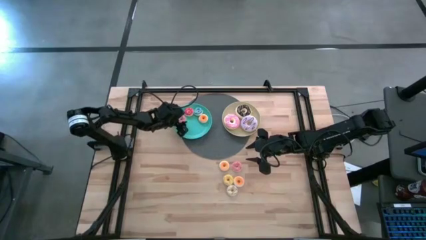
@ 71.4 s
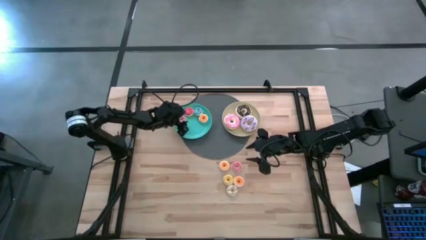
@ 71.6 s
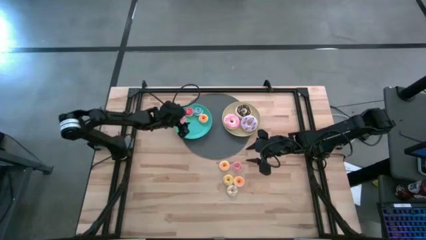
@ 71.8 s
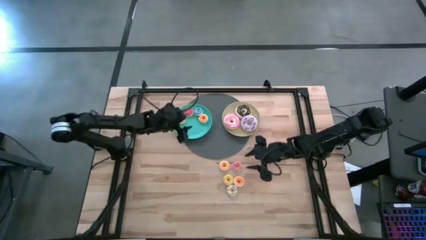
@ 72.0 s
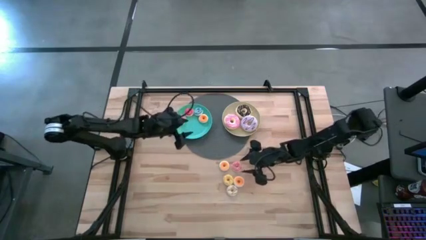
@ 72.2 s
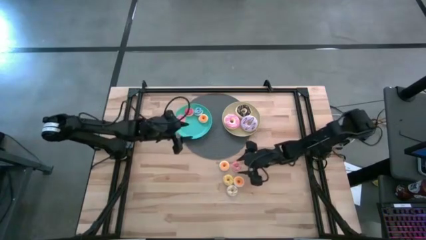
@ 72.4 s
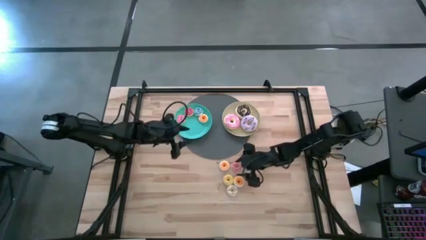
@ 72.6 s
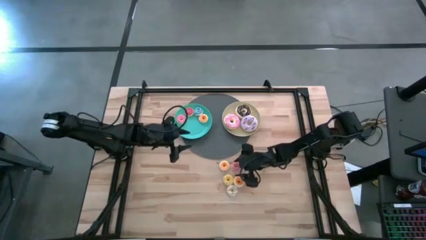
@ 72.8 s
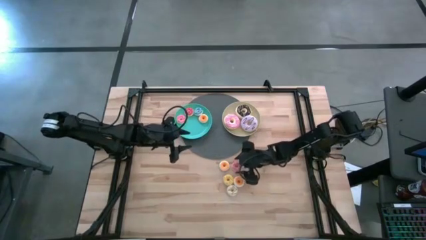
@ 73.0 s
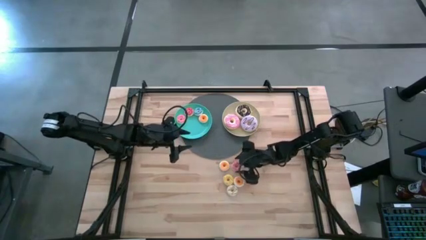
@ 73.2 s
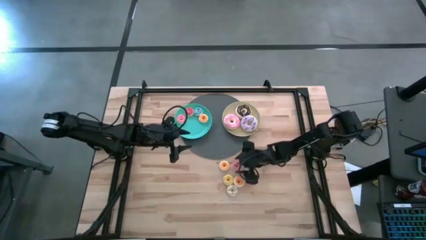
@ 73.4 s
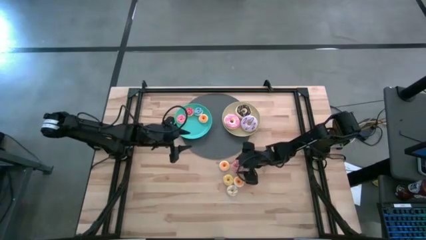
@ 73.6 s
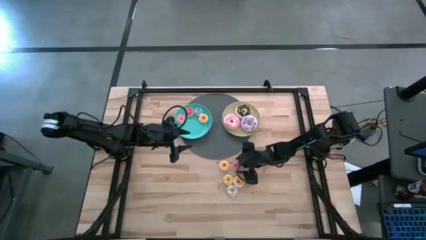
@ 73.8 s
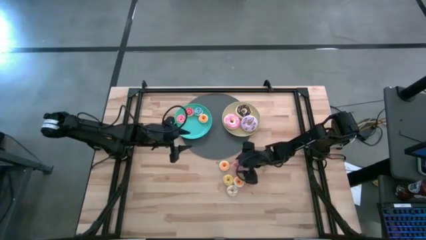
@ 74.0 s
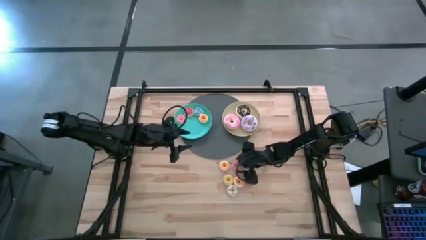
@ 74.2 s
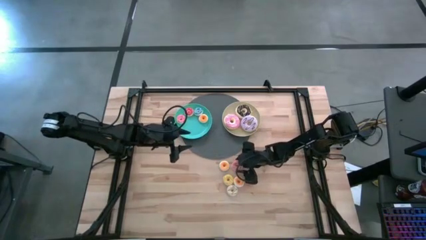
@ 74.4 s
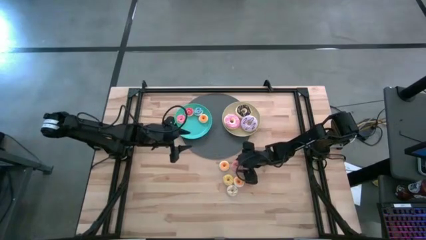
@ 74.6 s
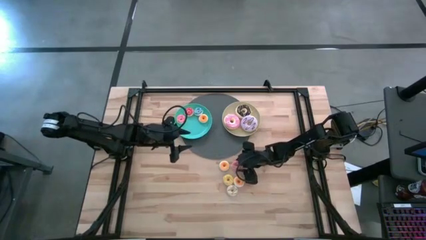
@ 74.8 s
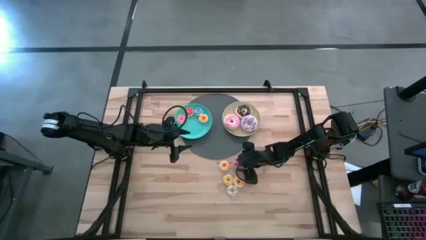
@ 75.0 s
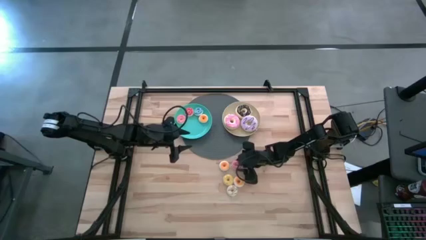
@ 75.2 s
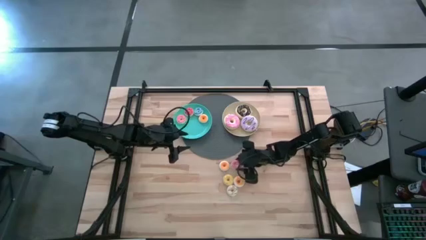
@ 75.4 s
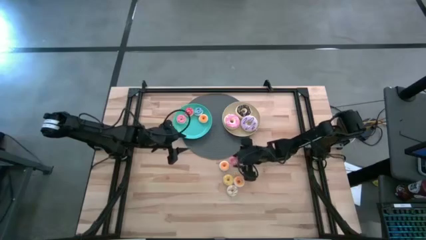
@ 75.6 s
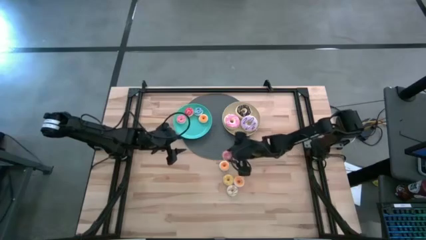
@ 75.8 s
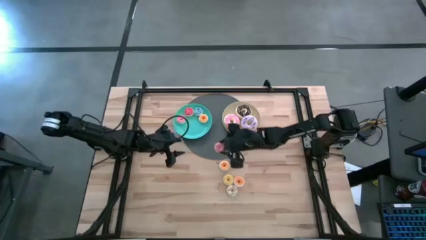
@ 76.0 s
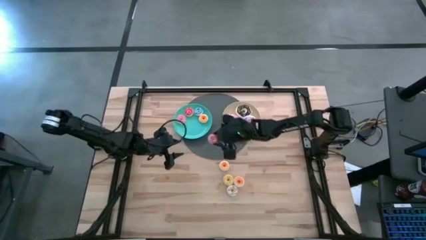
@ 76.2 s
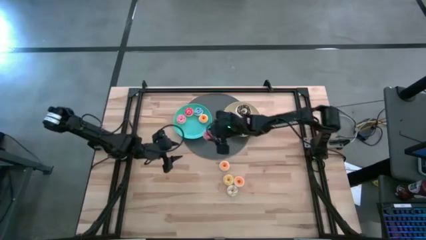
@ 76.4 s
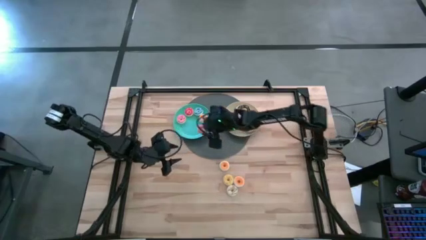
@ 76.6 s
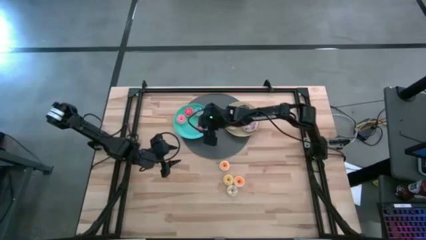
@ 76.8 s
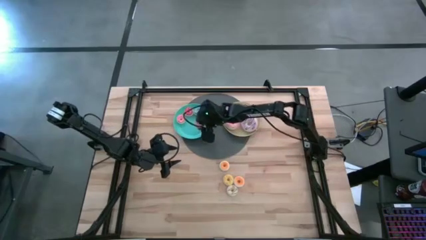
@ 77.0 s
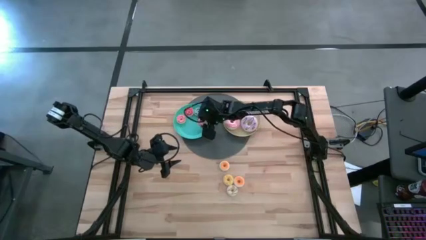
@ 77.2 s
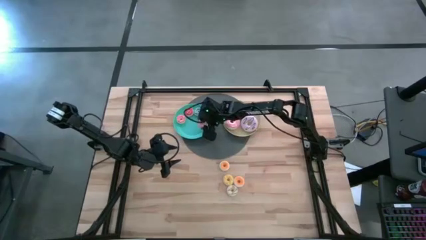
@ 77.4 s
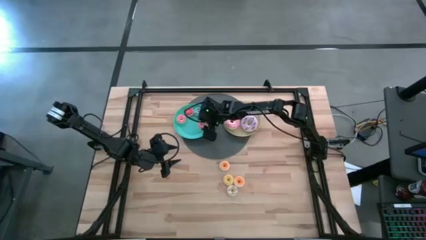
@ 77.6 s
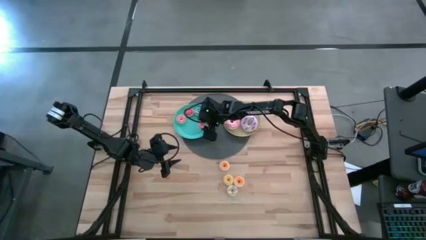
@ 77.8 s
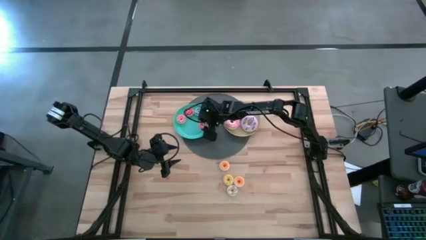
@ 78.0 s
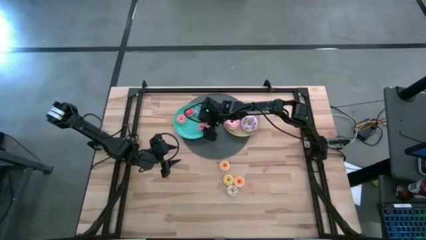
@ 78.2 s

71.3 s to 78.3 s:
Task: Pick & Place donuts
Put the small pink donut on the green plate

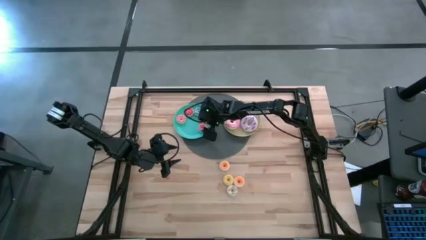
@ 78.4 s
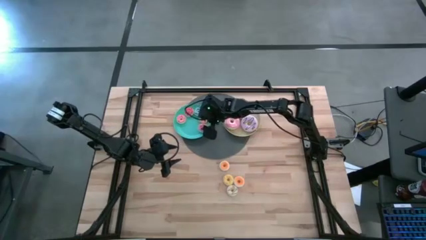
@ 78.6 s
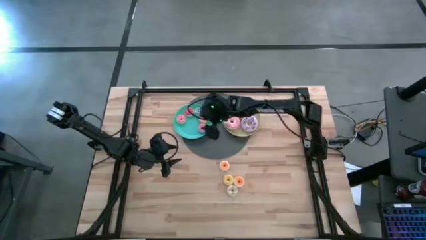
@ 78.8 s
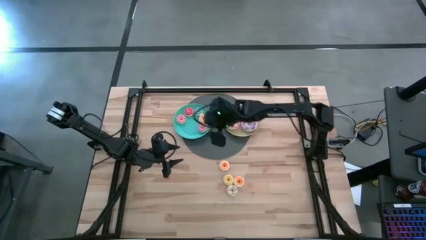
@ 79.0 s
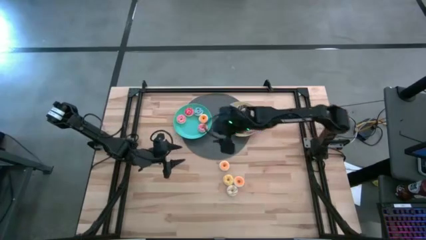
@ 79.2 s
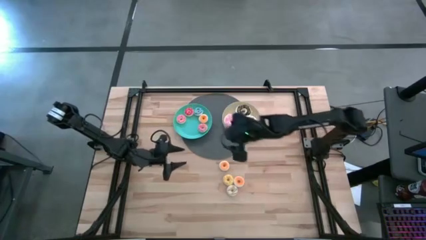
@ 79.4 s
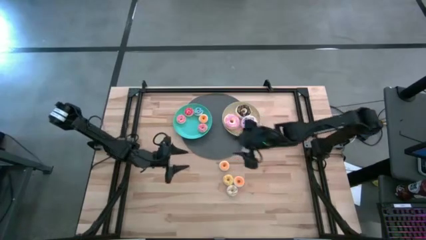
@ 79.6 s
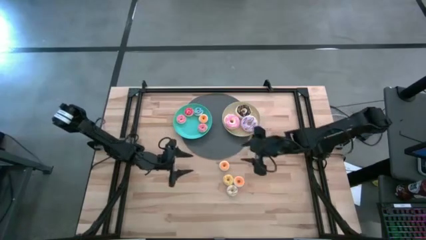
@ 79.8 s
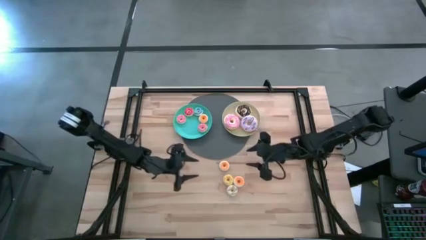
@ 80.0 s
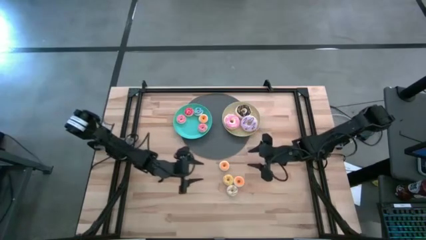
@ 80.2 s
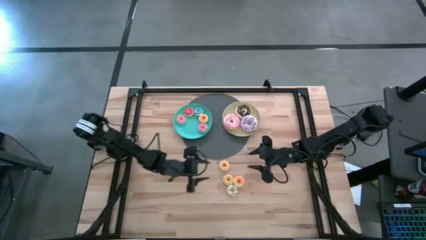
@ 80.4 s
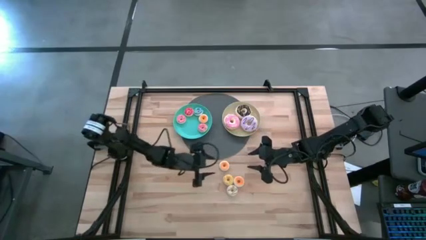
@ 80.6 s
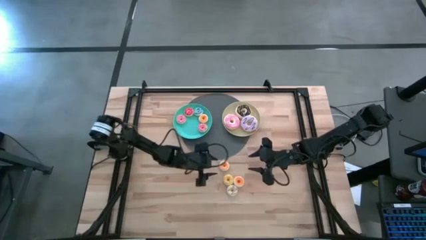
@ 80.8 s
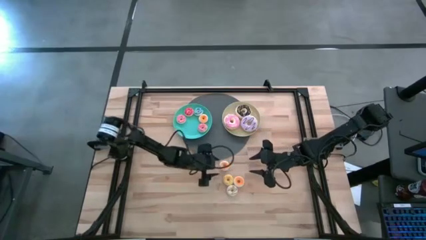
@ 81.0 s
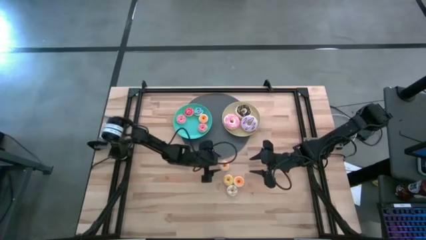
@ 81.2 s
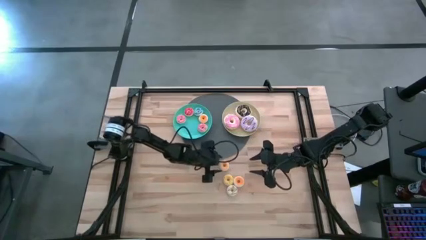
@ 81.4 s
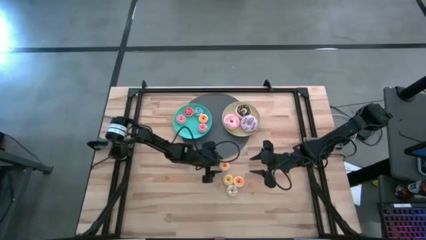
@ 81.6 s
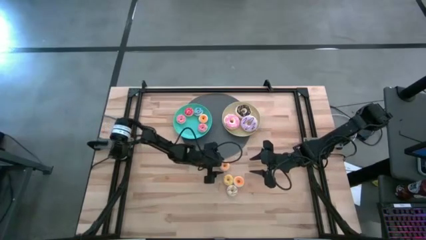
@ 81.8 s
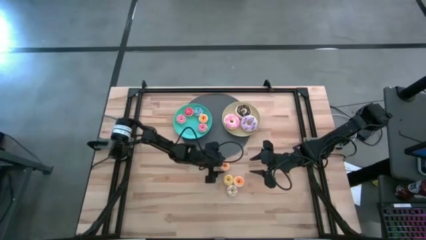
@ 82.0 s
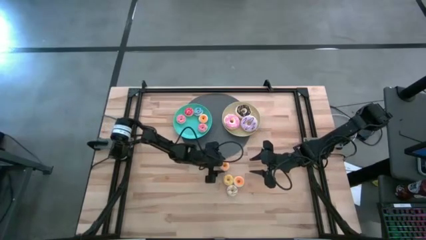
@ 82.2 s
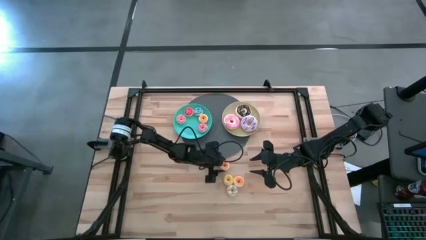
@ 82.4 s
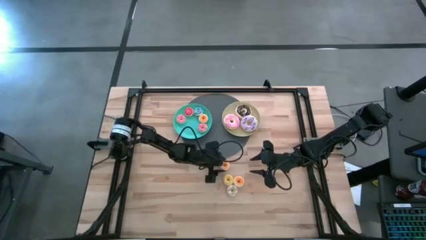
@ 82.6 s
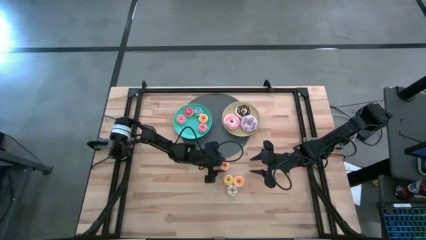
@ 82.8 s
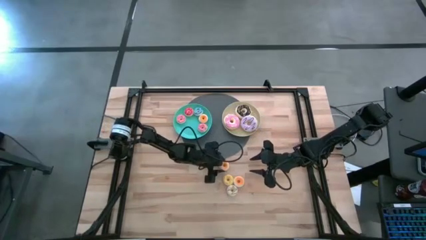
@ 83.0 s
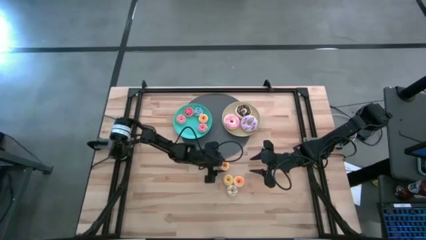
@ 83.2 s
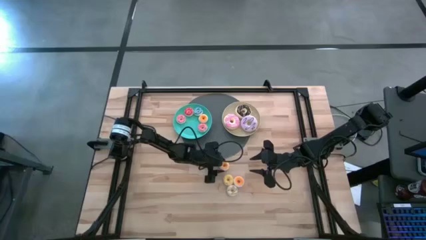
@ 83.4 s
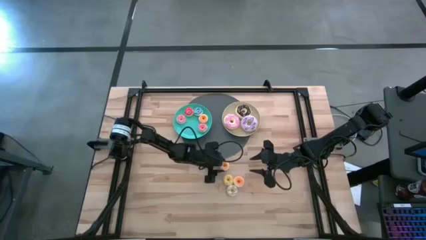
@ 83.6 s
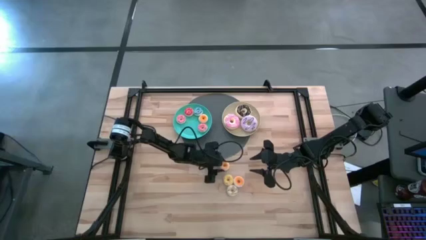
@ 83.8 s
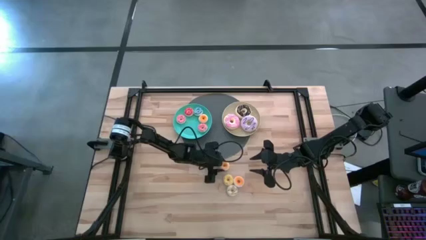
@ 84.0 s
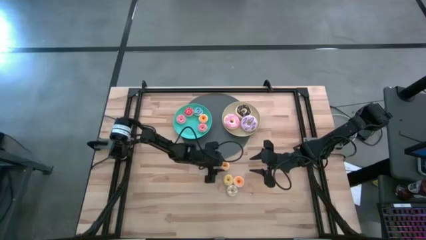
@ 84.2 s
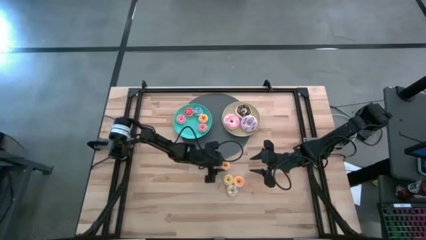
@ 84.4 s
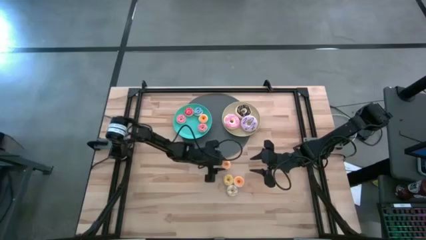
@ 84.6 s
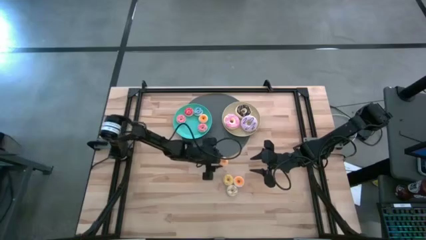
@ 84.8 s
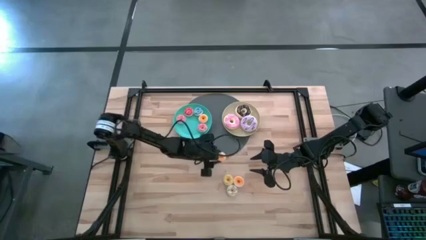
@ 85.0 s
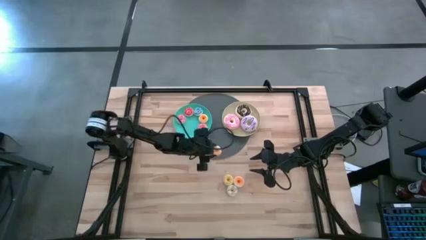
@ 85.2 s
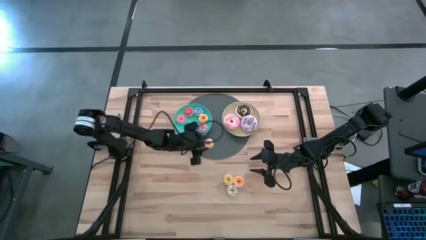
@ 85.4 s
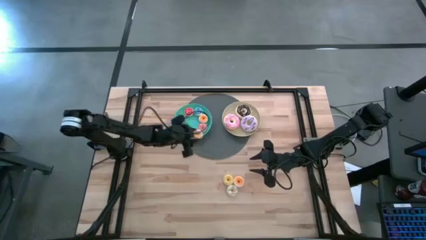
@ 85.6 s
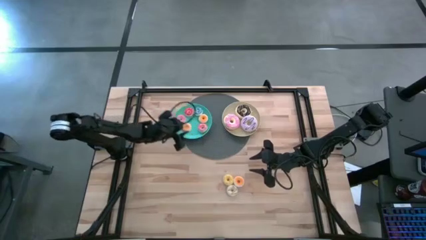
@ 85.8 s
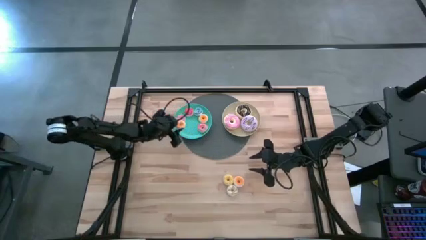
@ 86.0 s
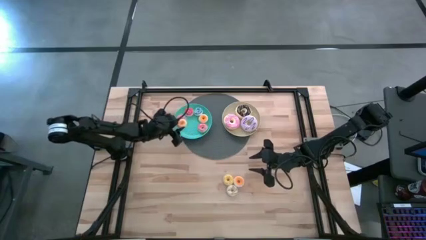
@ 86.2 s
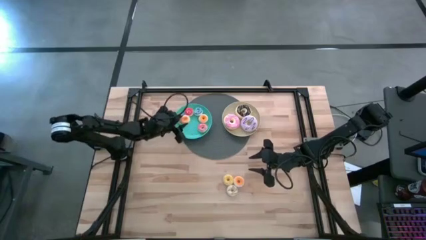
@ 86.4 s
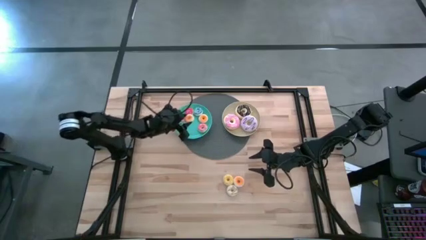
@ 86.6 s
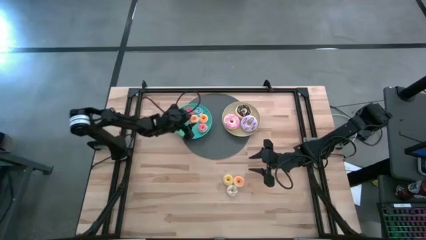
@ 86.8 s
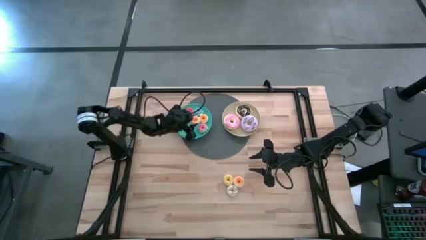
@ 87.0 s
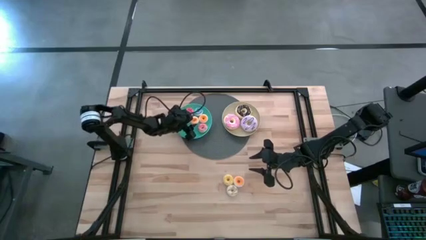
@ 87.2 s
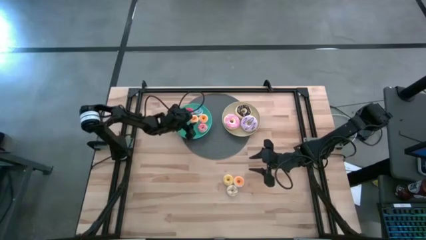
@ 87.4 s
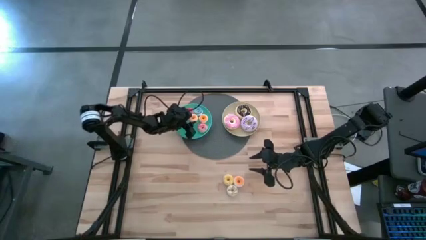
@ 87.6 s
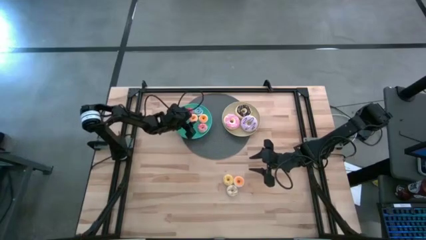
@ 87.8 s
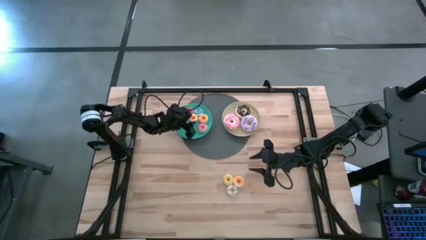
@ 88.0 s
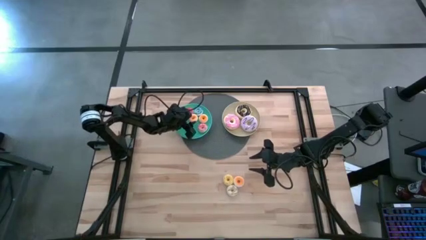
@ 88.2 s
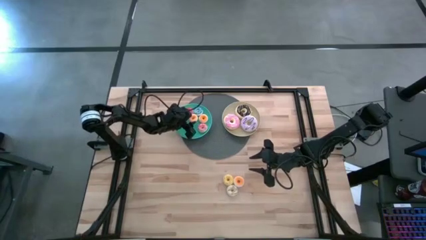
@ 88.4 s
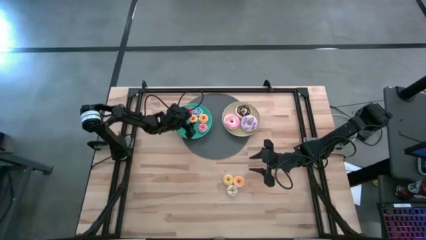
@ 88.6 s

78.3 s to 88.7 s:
Put the small top orange donut on the green plate
